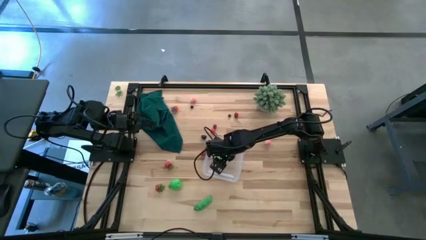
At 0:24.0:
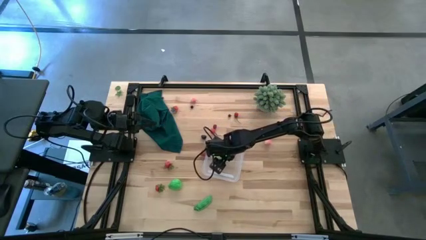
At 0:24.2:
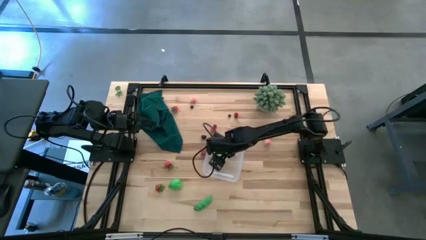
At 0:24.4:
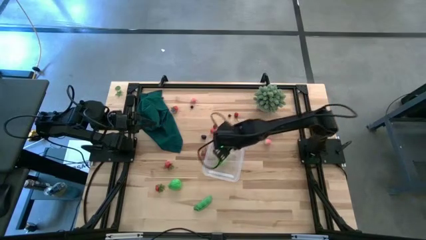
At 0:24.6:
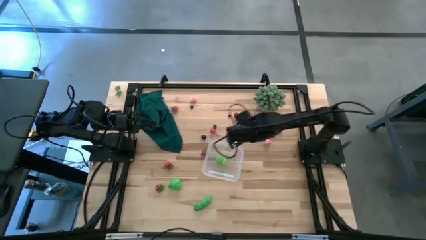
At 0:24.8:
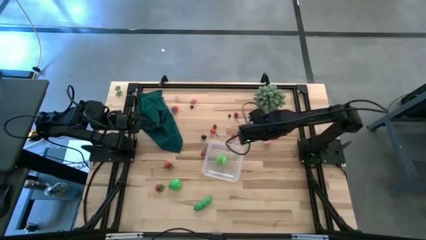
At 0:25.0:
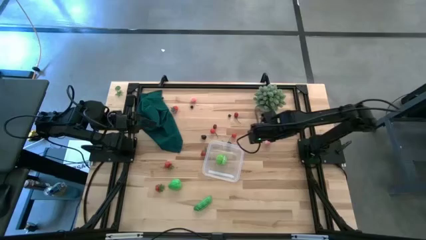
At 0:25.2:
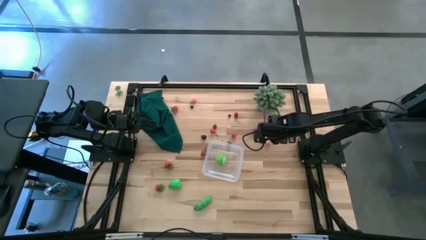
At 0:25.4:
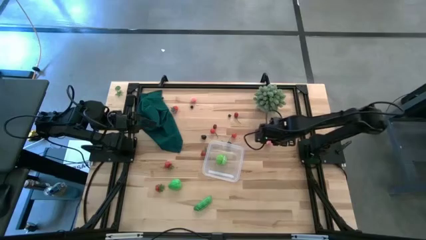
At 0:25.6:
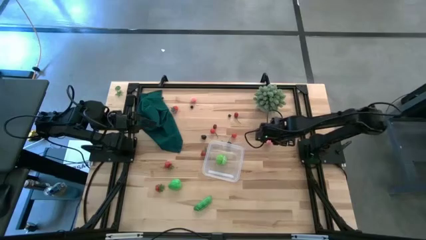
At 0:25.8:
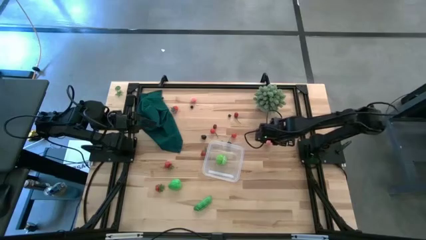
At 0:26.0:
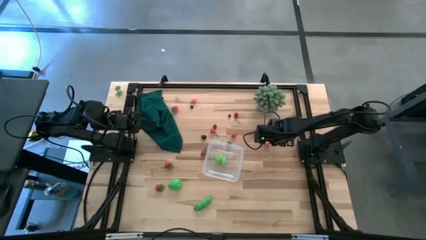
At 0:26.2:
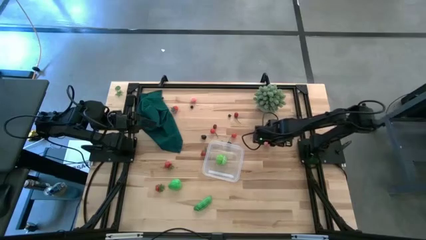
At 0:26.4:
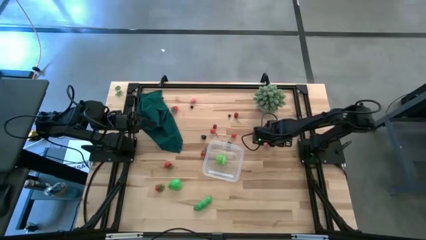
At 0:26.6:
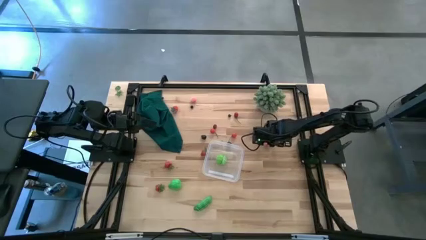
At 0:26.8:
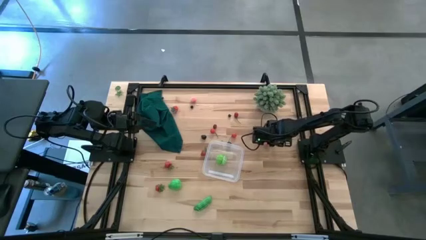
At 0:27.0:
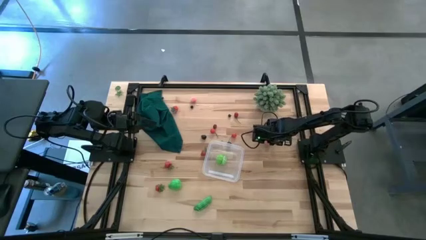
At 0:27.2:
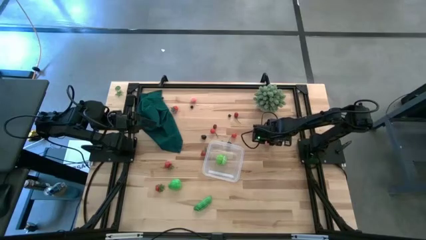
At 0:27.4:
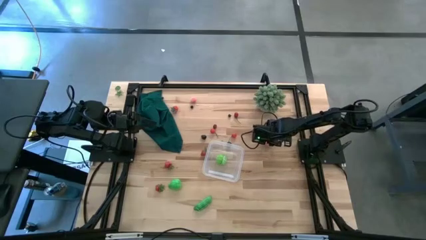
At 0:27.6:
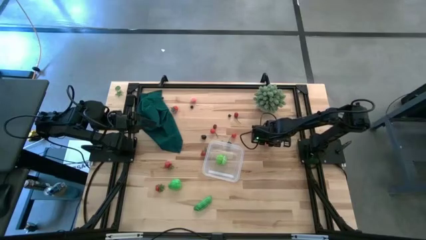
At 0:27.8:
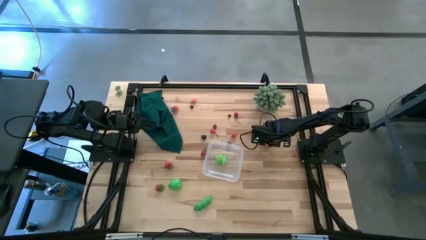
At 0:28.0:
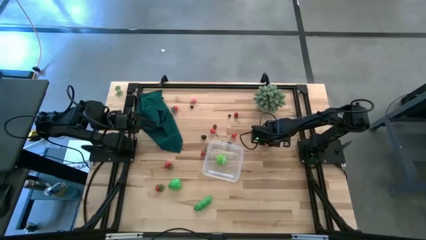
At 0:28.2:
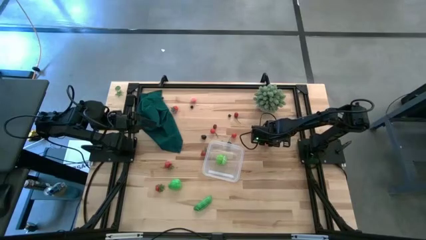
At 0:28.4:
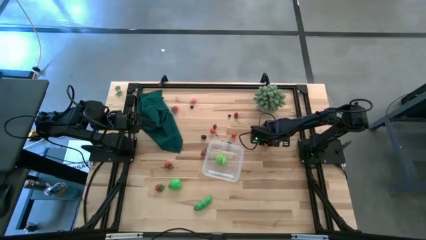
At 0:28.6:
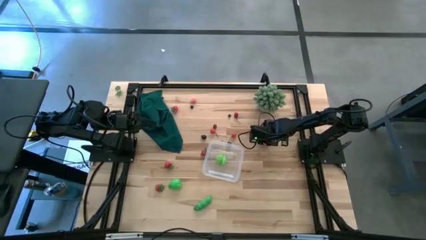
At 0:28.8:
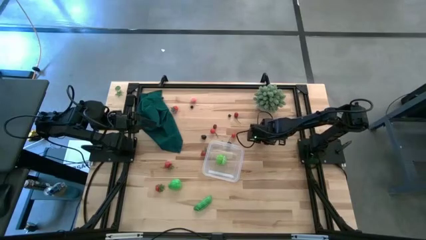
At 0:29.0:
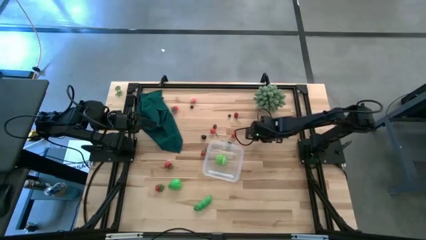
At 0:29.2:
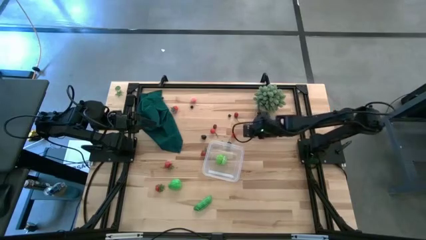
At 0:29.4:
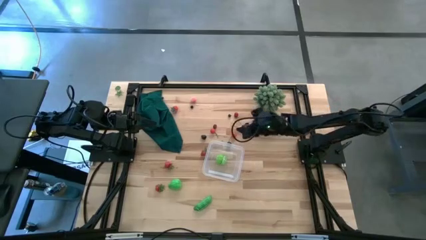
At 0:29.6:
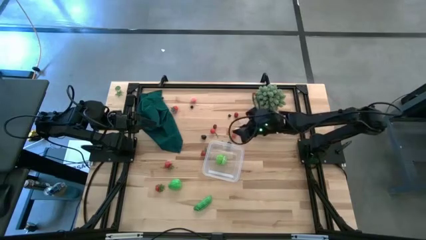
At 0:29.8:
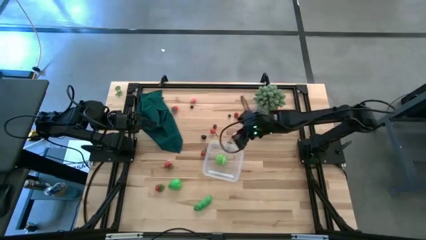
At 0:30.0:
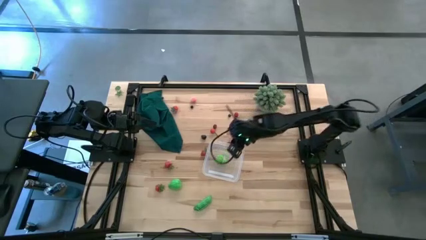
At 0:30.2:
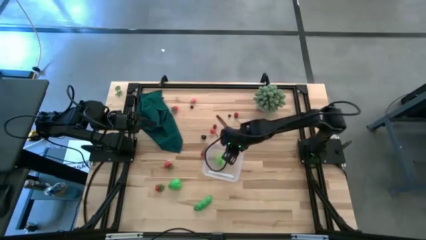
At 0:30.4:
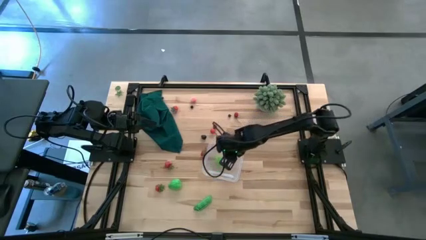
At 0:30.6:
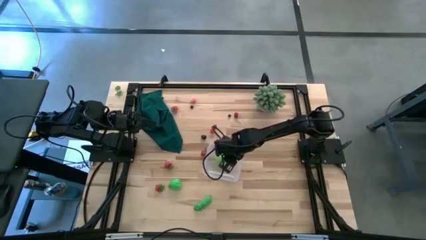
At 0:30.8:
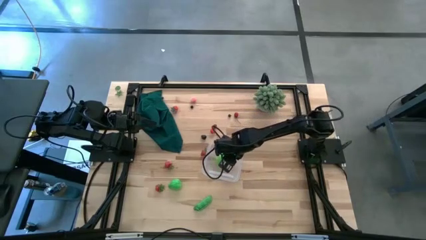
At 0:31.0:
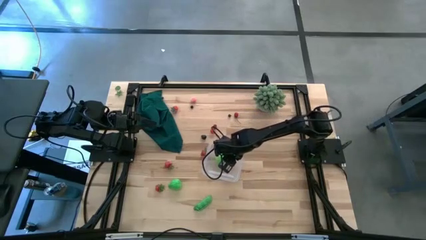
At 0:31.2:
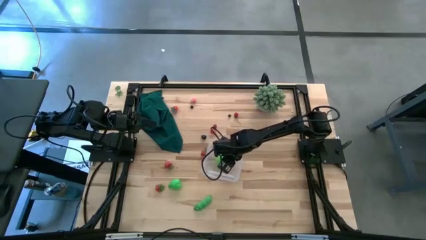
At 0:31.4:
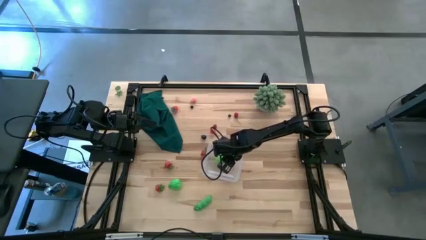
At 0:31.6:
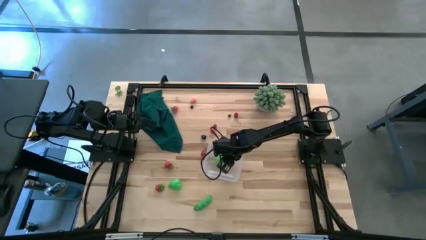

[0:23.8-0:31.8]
Task: Pick and placing Produce into tupperware
Put the bottom pink peach into the container

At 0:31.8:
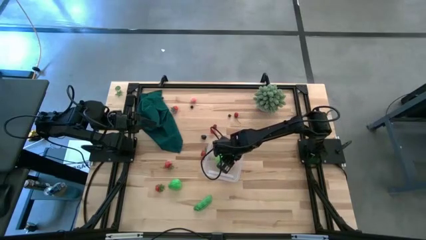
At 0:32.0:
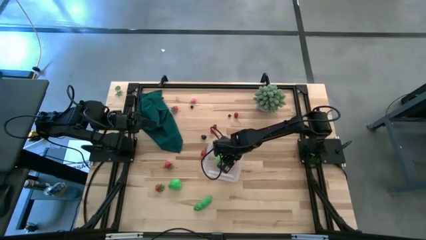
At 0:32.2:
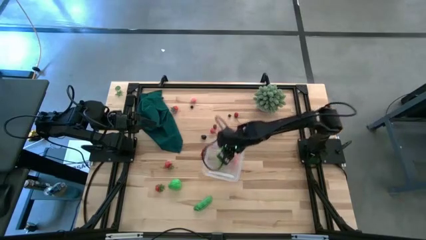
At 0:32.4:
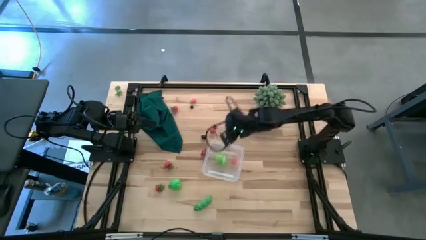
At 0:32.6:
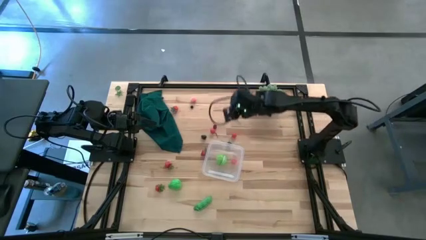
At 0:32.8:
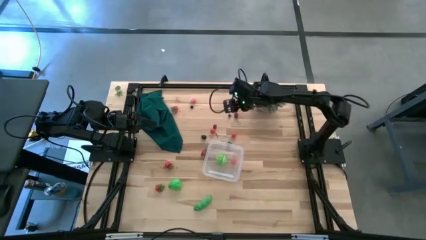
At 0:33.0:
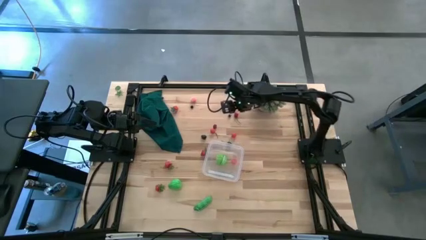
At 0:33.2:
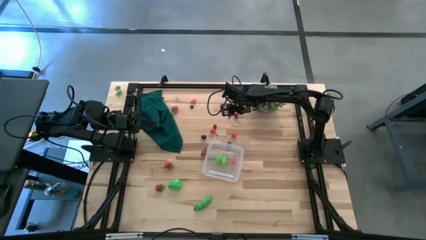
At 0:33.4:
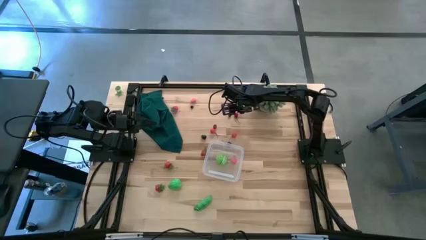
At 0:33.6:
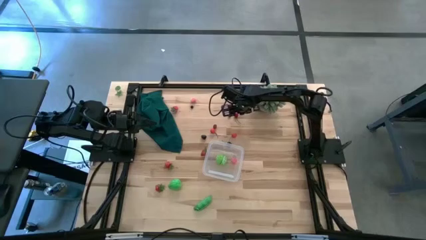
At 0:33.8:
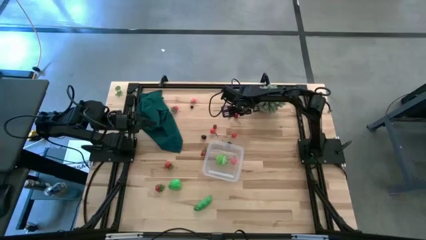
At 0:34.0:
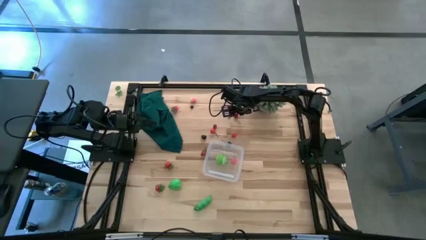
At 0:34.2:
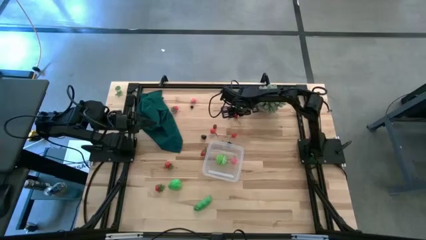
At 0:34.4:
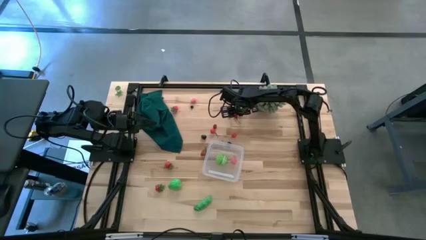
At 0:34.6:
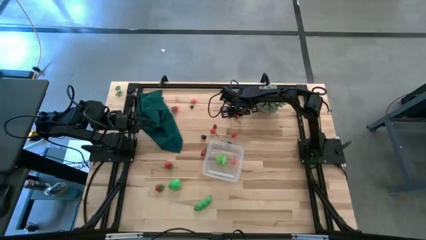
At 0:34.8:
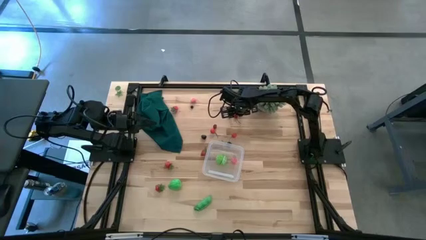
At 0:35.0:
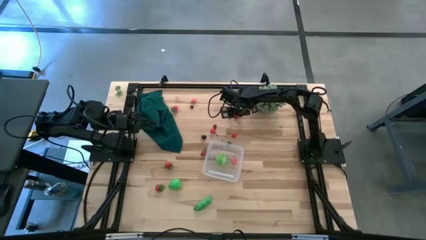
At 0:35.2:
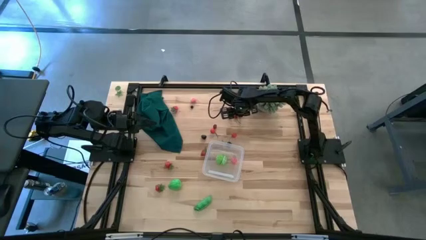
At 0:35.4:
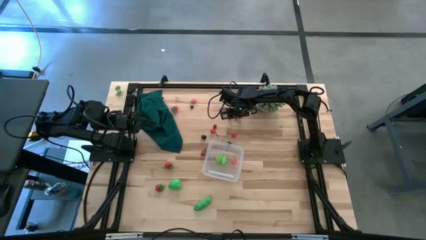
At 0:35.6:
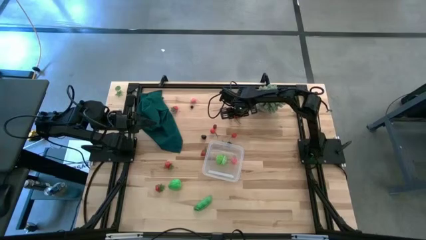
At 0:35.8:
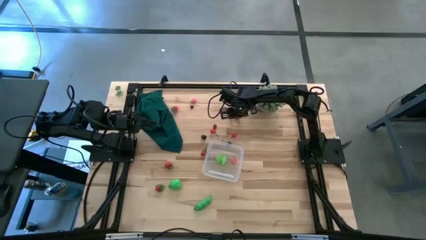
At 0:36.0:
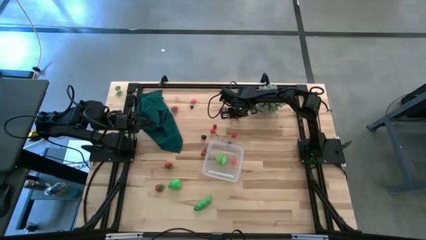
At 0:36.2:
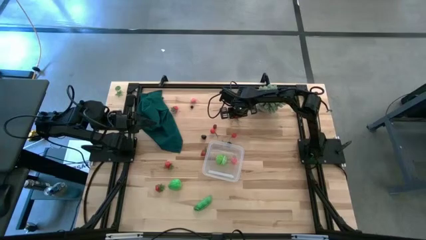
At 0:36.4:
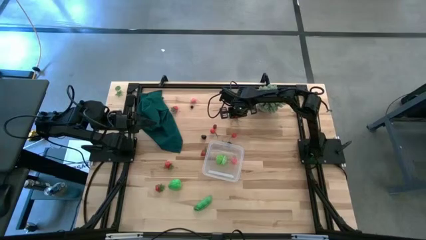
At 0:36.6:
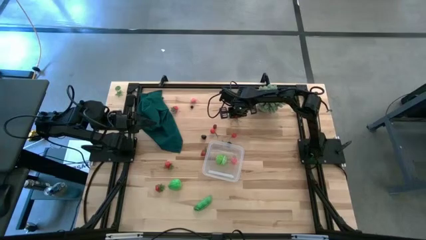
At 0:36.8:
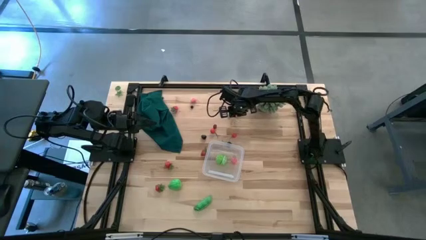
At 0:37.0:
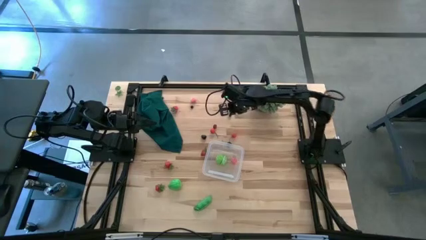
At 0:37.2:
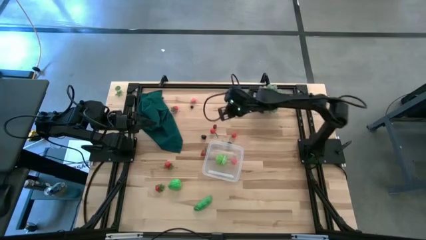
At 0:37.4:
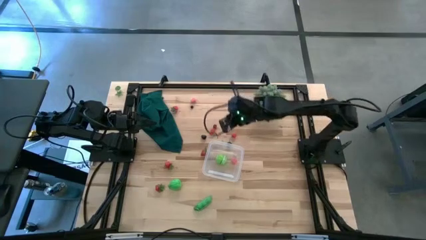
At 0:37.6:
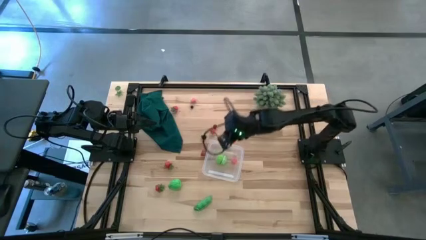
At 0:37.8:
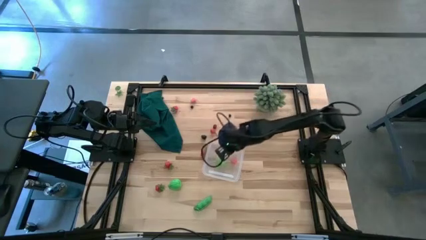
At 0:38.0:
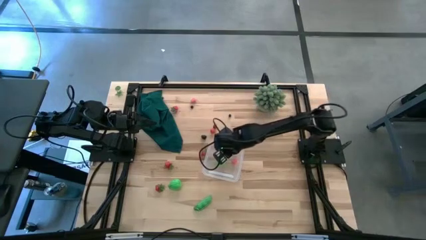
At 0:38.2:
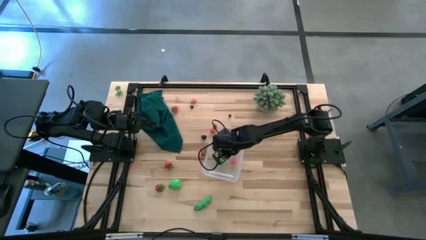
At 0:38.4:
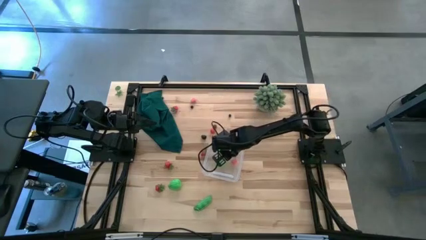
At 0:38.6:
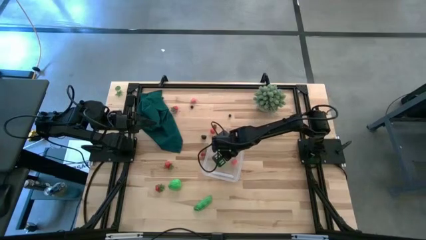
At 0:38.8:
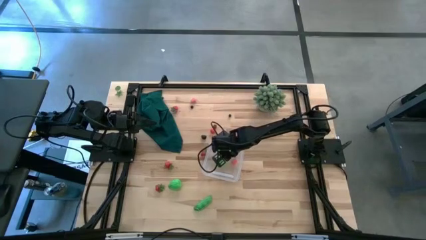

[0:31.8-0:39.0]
Put the top red cherry into the container
